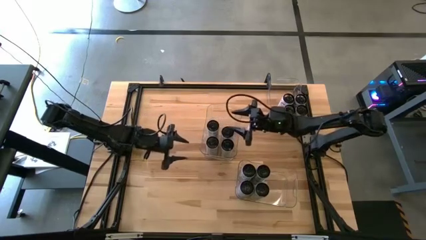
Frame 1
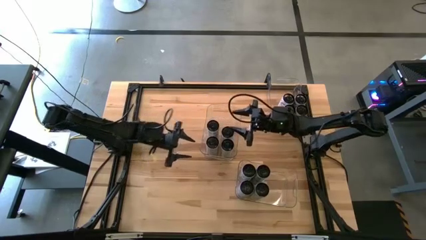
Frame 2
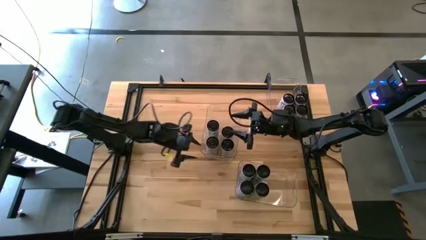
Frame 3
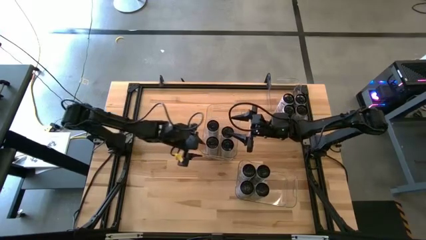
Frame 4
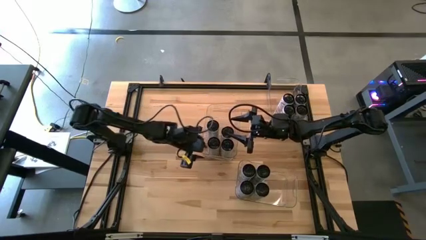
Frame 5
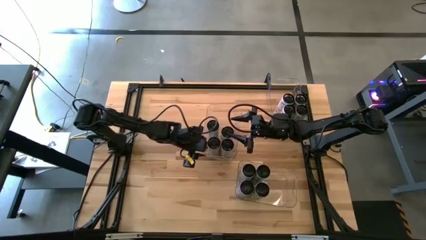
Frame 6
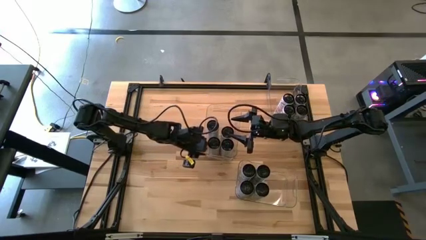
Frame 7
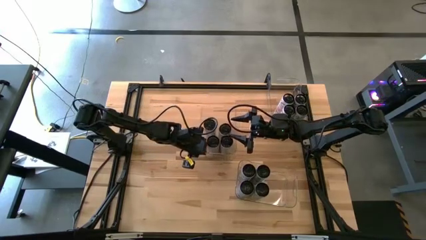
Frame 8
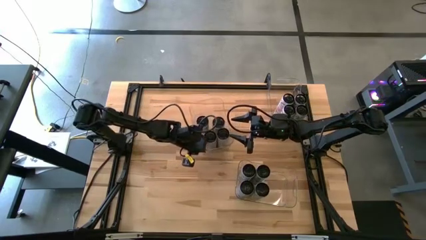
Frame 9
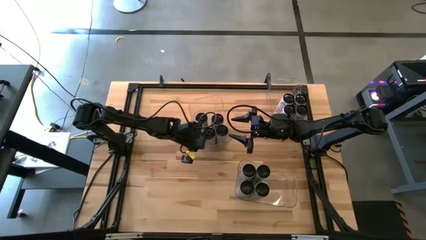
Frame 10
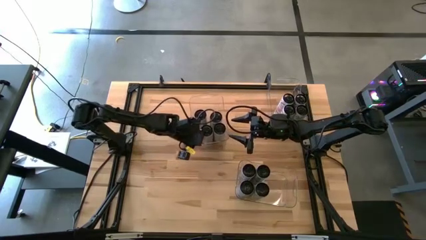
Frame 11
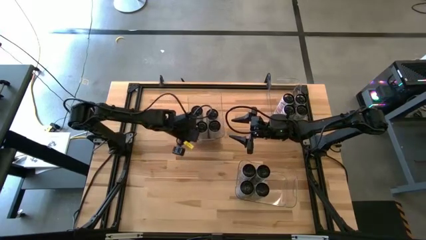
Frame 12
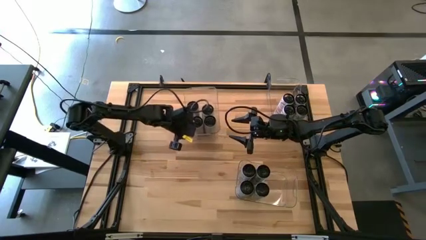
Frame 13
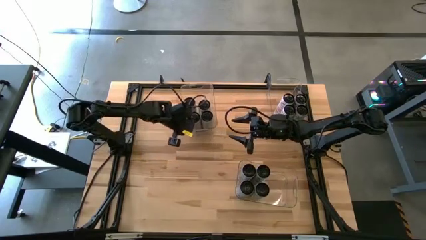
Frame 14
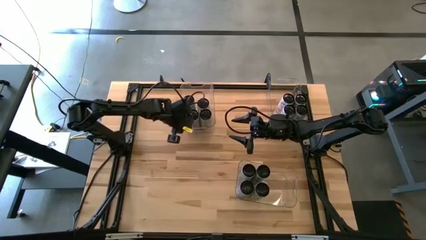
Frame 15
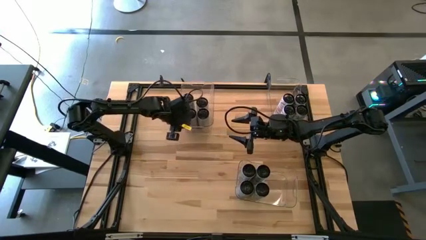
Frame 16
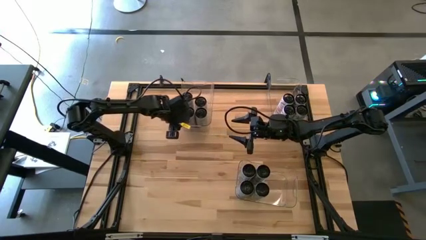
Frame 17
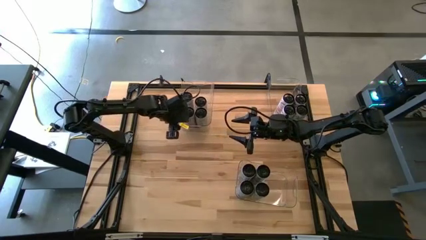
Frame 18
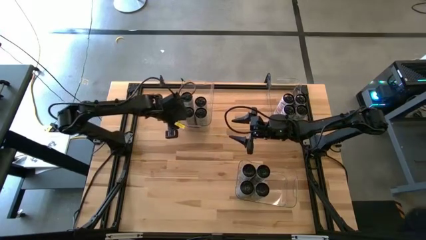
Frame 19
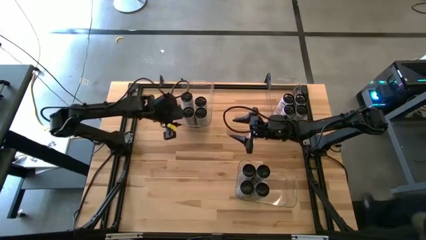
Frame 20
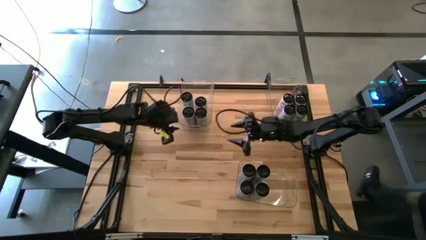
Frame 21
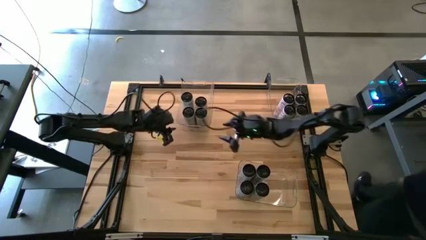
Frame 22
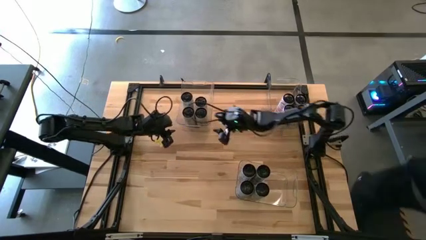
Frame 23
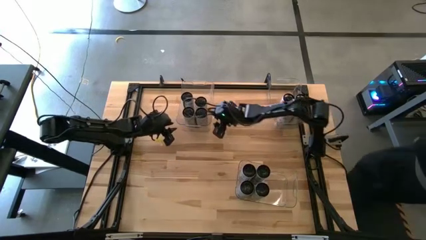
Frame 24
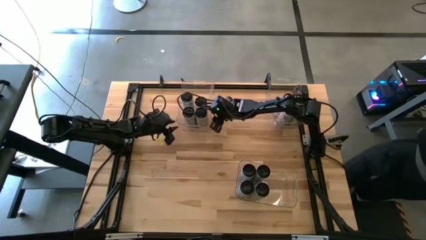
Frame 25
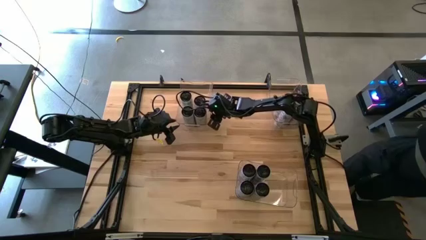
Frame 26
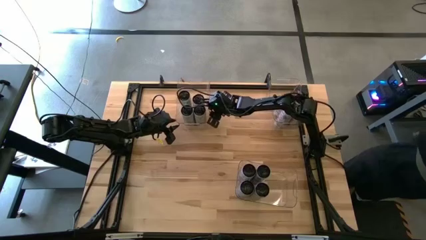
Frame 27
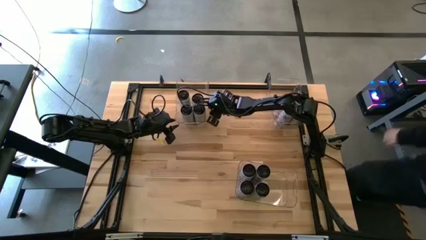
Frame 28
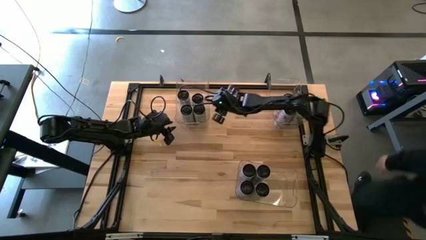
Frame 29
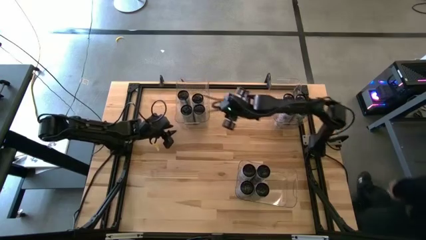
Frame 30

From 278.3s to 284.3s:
Task: Sort soda cans
Move the transparent bin to the top left of the table

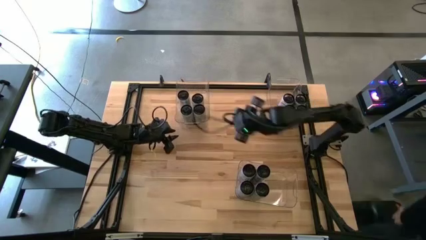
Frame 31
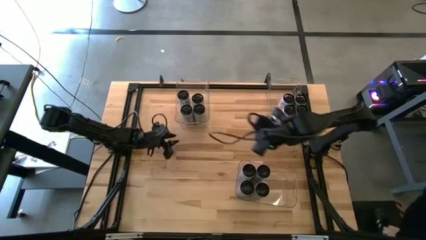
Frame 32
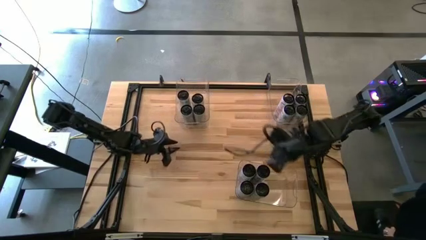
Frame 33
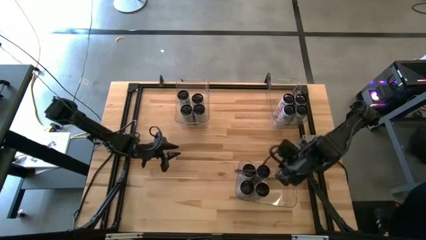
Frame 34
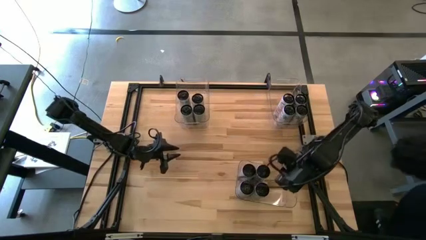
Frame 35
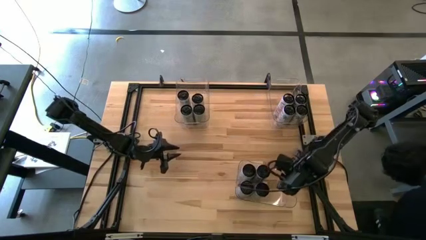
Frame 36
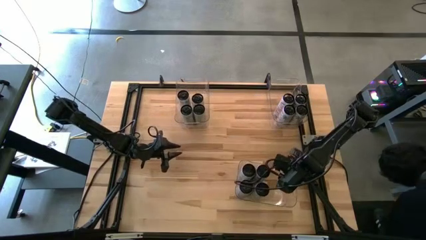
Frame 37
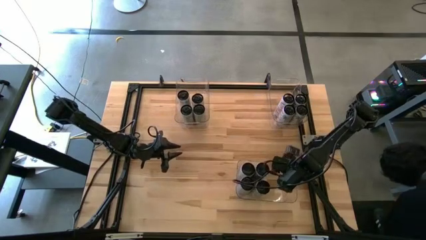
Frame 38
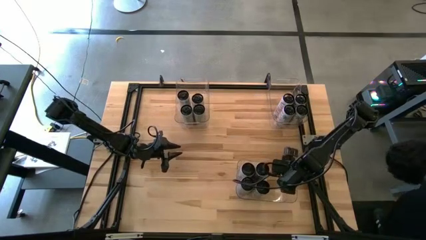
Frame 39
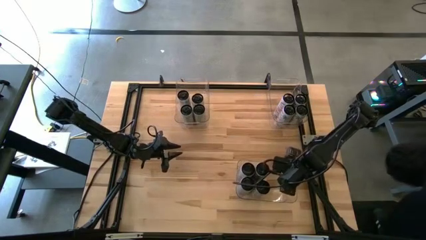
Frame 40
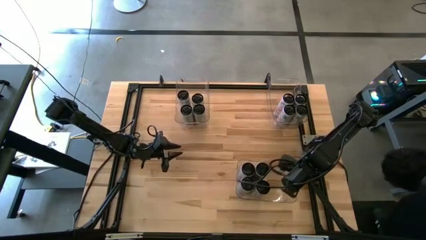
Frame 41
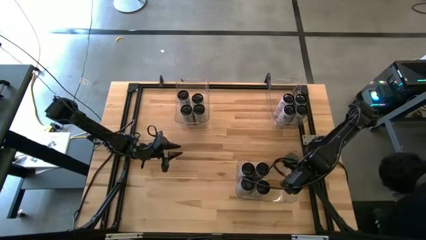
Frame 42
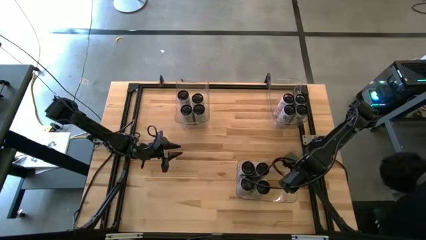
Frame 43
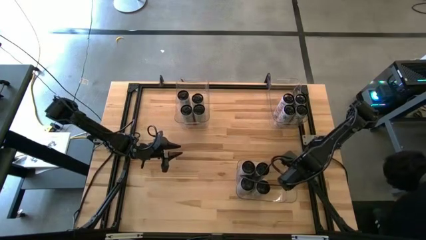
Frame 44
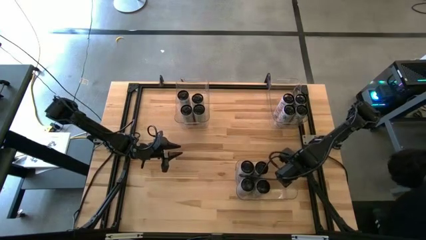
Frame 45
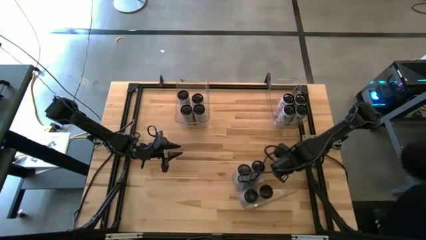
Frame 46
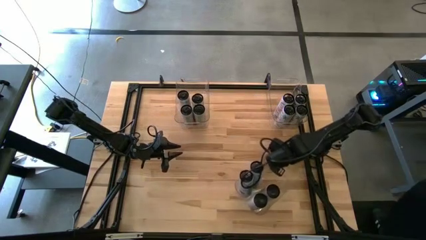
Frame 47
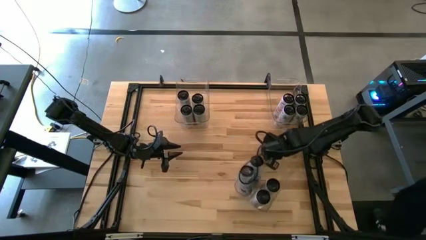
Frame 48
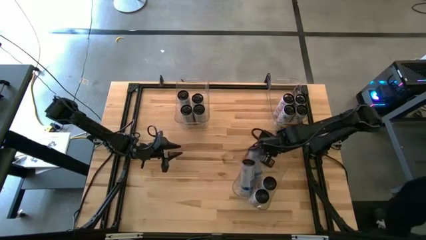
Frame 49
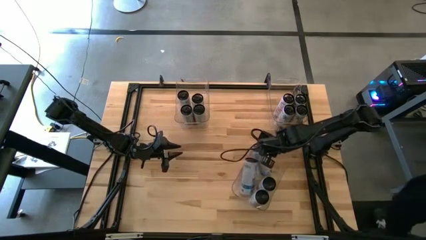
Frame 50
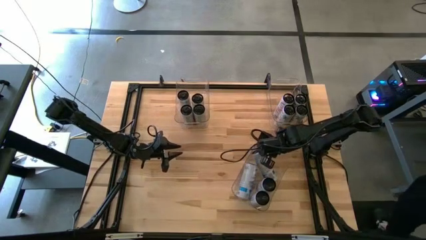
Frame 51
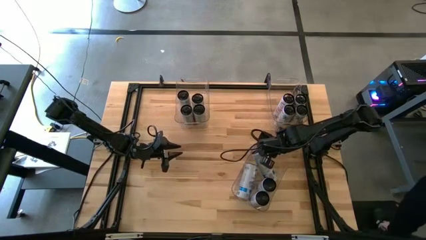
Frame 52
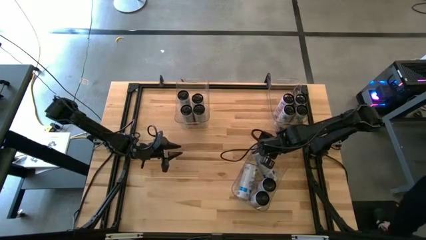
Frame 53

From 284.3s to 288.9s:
Adjust the bottom left transparent bin
